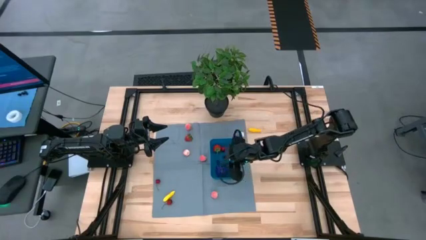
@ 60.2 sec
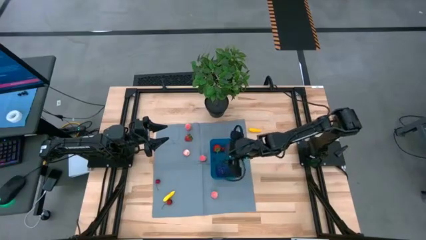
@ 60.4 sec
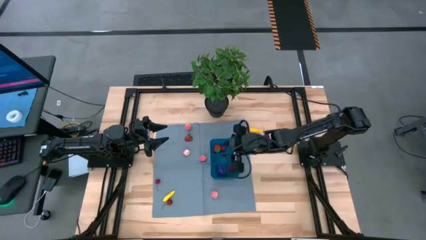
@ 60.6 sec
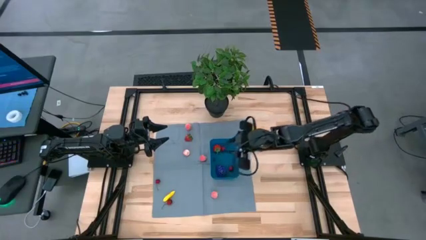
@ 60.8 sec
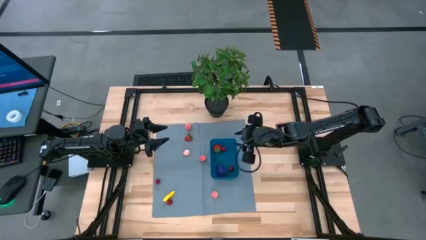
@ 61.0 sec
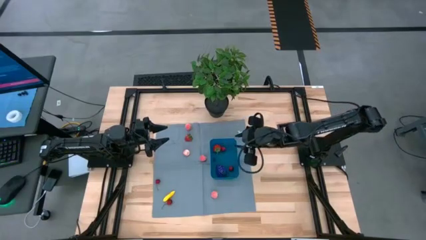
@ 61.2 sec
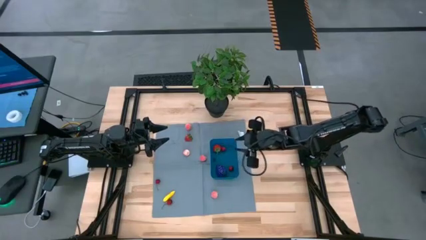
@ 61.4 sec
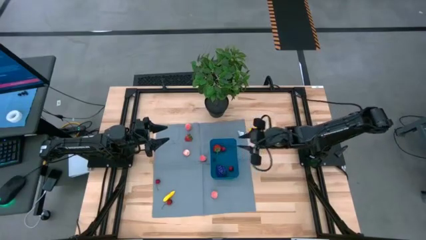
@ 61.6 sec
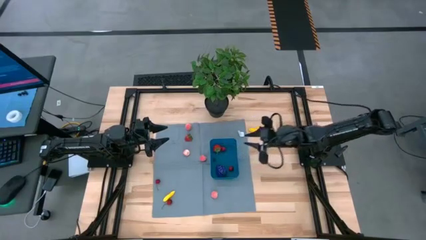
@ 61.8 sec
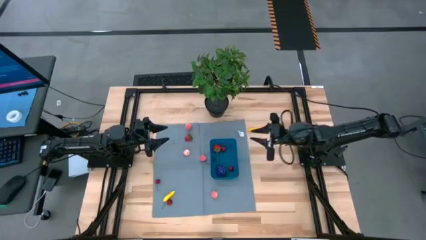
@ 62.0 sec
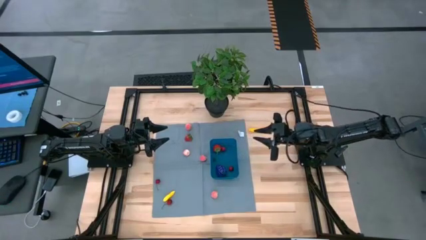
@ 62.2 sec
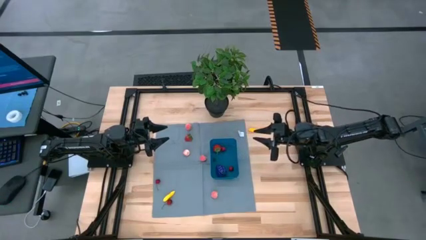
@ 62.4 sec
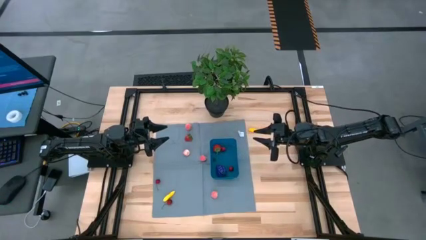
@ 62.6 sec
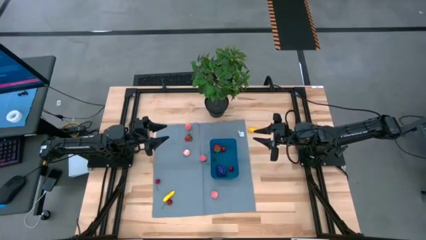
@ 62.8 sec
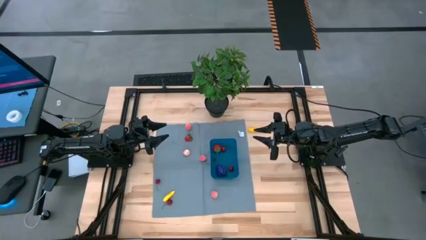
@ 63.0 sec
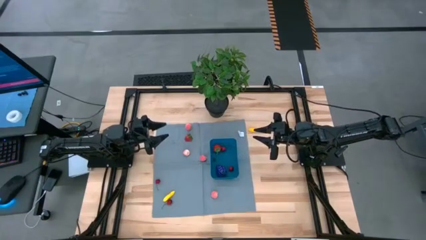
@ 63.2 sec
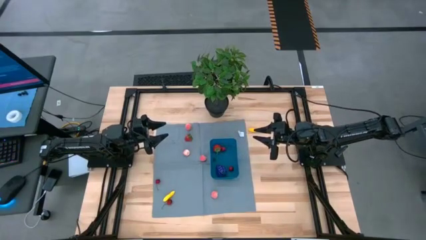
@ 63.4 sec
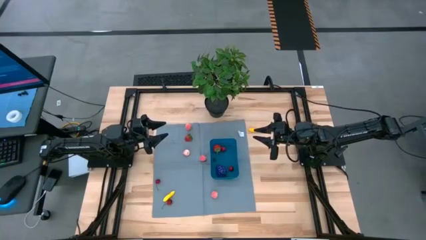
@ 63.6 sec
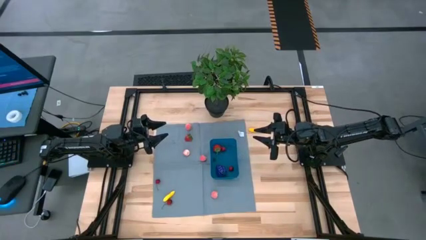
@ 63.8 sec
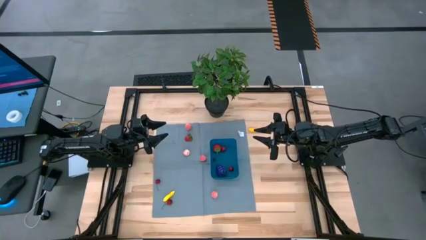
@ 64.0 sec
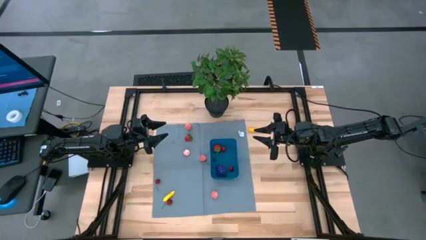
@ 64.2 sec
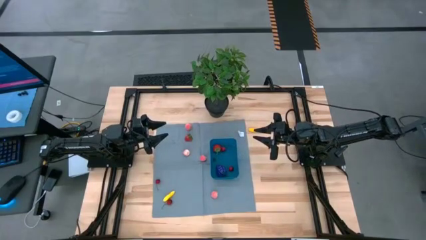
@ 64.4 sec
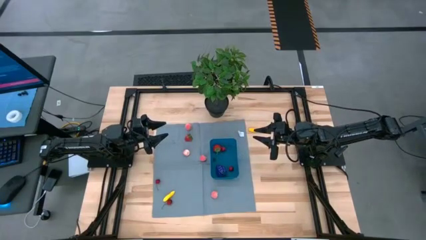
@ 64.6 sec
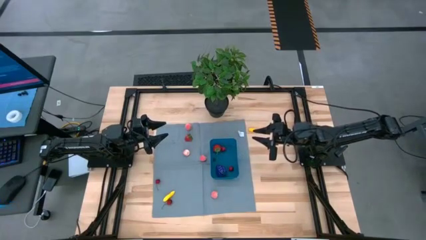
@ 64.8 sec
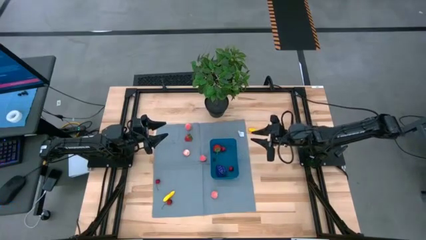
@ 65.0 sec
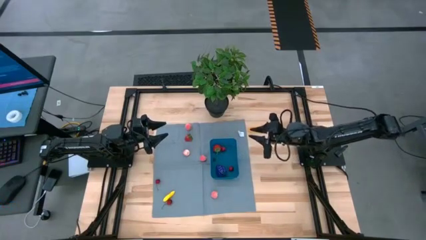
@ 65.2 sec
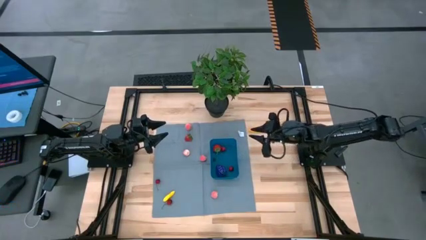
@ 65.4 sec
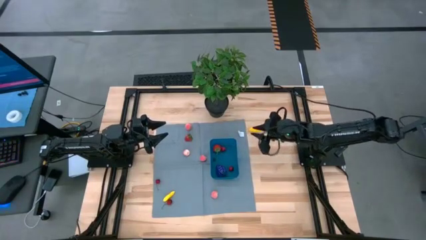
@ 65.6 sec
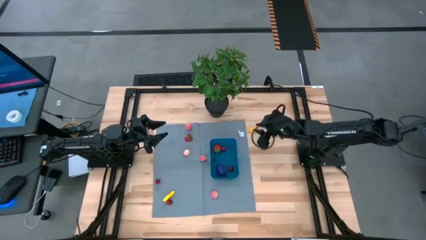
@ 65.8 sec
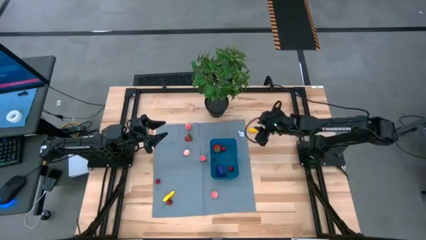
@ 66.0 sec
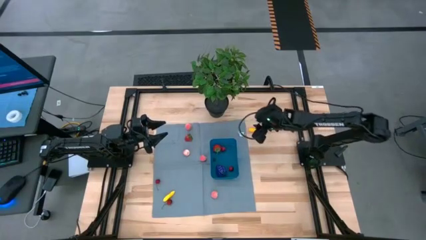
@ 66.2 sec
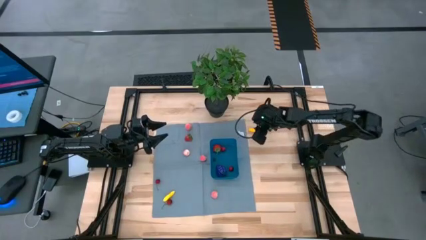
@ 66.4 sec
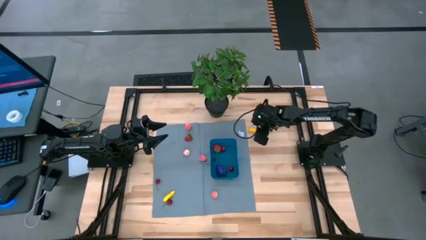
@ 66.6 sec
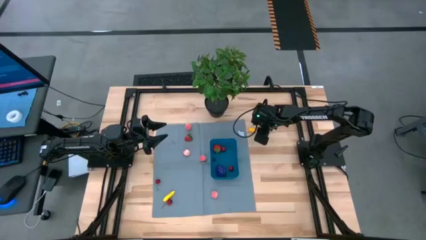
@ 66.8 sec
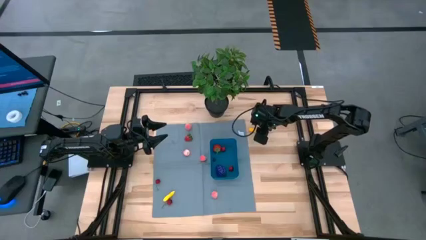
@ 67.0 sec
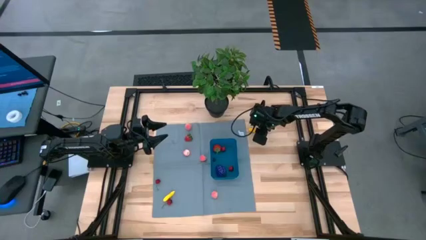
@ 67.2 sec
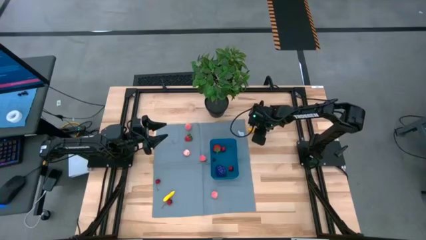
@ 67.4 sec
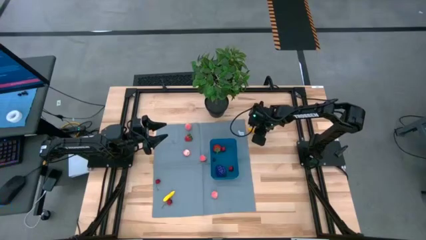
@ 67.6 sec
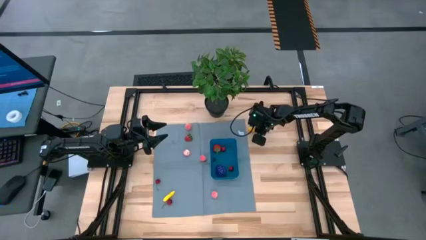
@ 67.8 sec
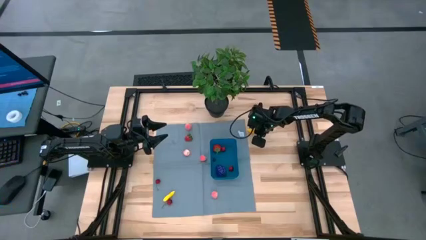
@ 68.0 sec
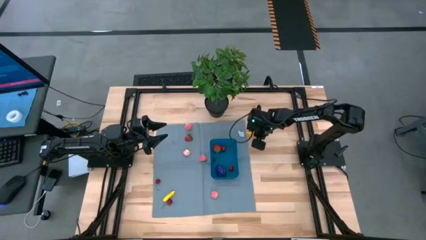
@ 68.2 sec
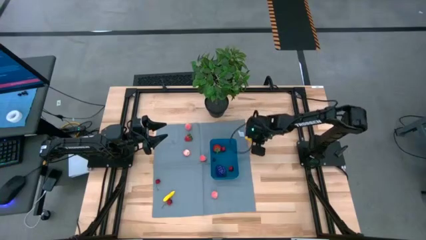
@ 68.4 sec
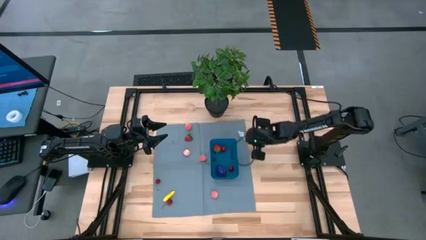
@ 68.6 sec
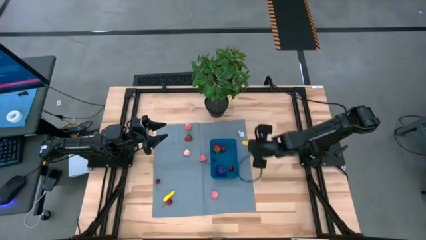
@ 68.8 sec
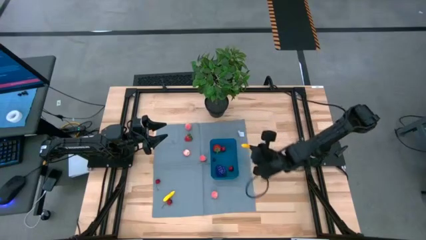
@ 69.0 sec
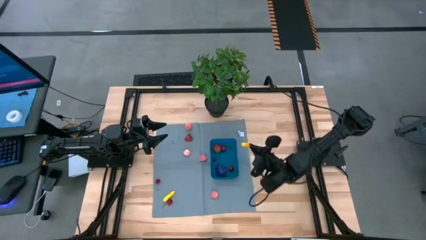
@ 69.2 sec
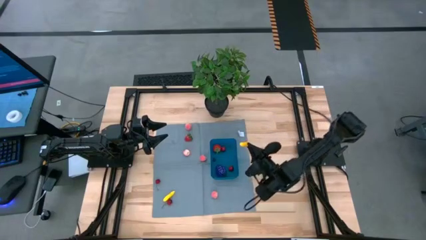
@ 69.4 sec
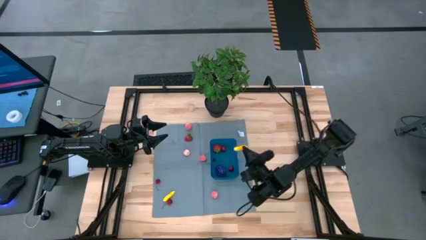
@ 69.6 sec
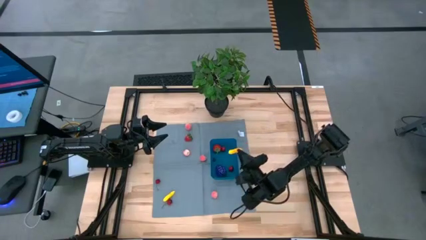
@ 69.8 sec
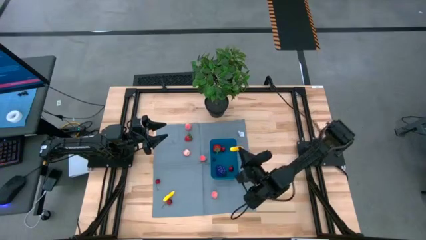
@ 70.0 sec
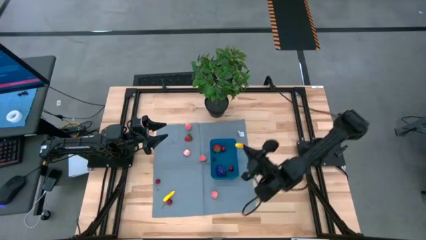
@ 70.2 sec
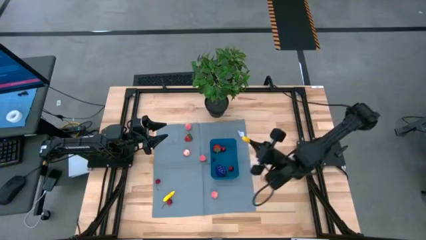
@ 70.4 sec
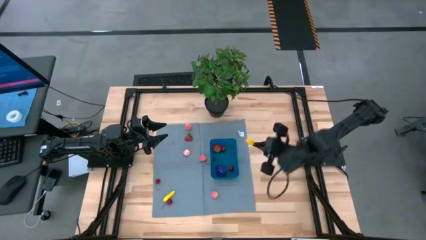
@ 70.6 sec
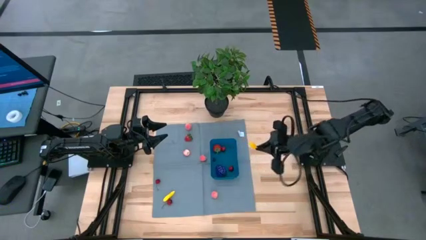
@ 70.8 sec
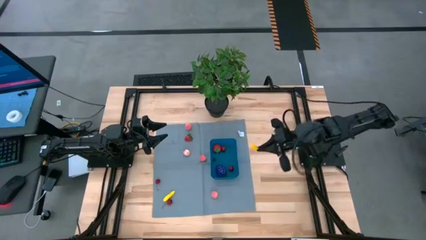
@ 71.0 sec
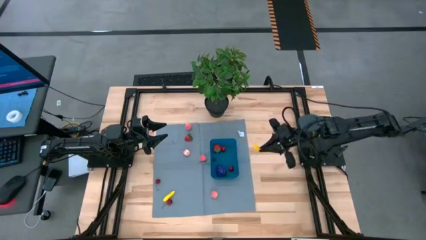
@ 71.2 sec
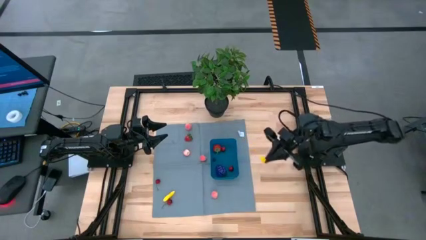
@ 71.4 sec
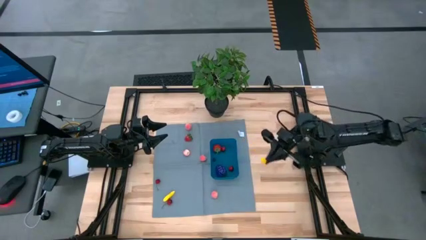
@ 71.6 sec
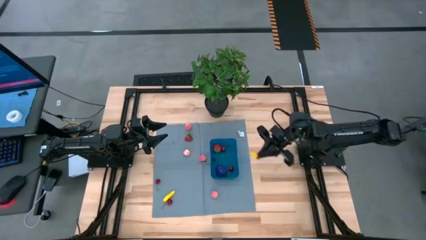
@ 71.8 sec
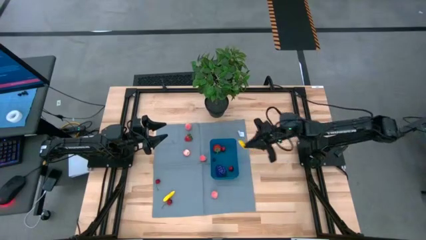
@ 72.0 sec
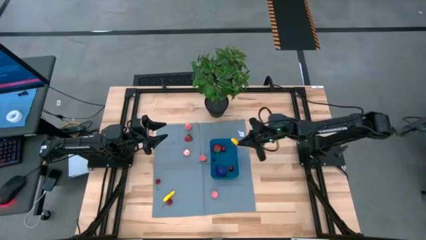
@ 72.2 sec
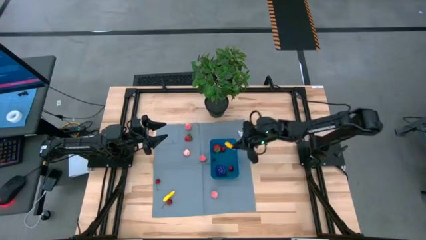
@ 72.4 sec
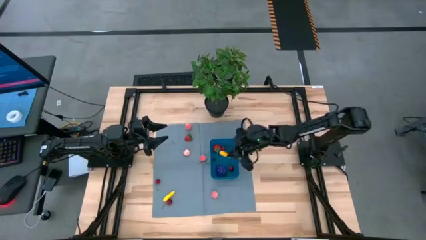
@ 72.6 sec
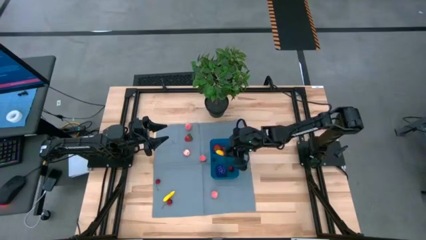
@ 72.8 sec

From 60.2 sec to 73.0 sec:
Task: Pick and placing Produce into tupperware
Put the top corn into the bin
